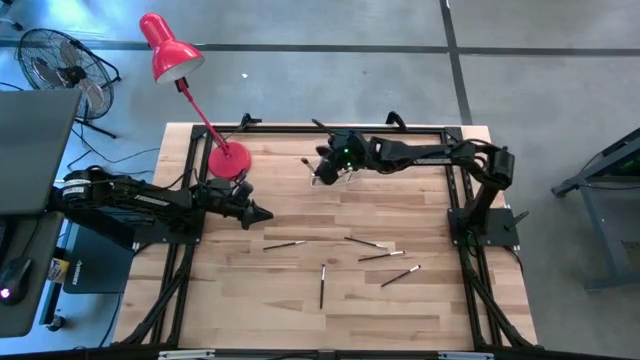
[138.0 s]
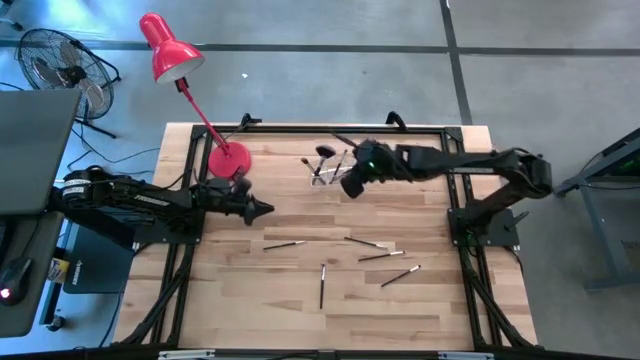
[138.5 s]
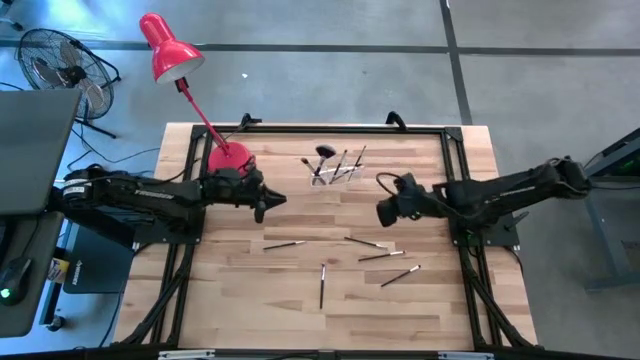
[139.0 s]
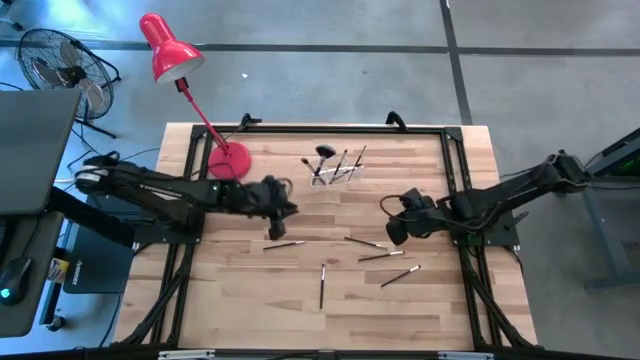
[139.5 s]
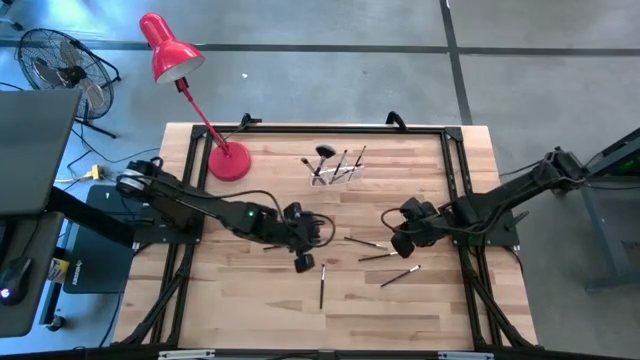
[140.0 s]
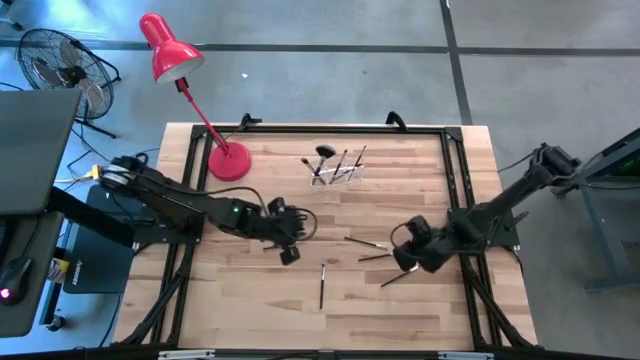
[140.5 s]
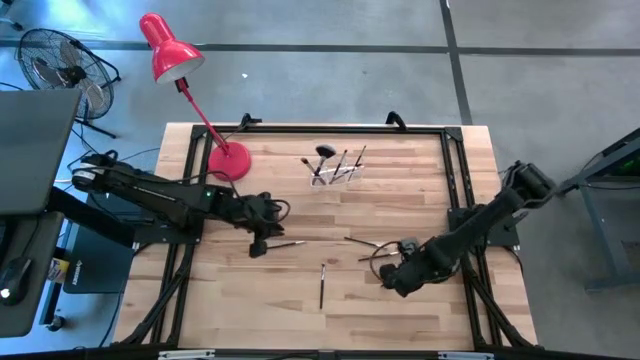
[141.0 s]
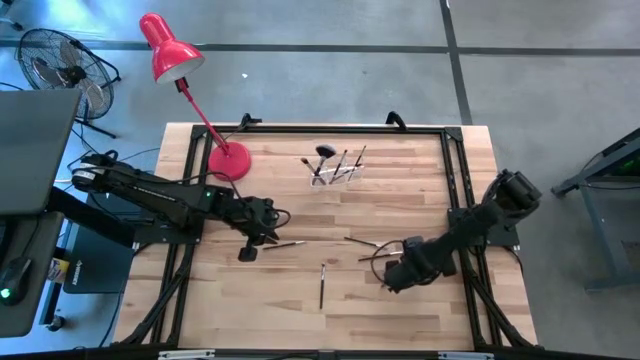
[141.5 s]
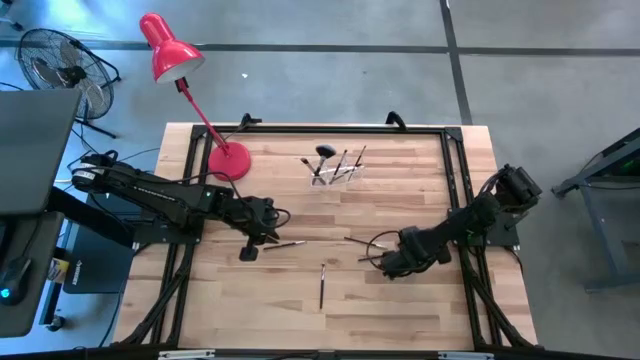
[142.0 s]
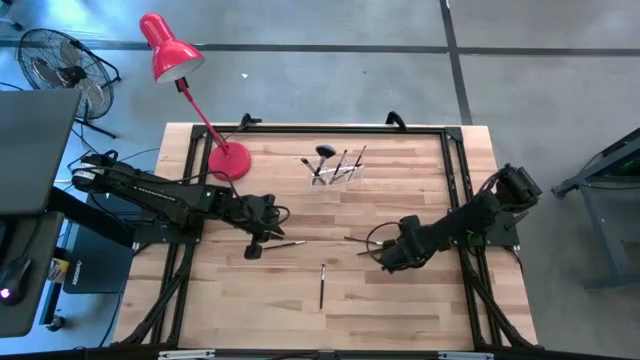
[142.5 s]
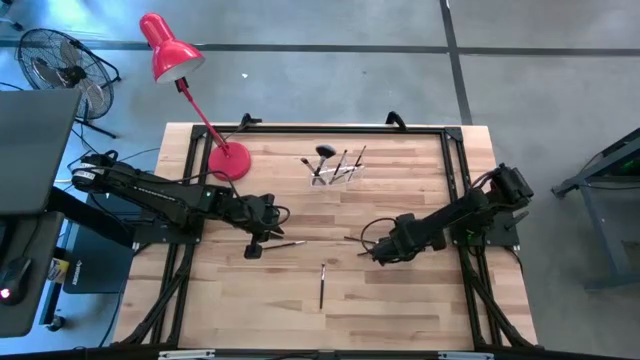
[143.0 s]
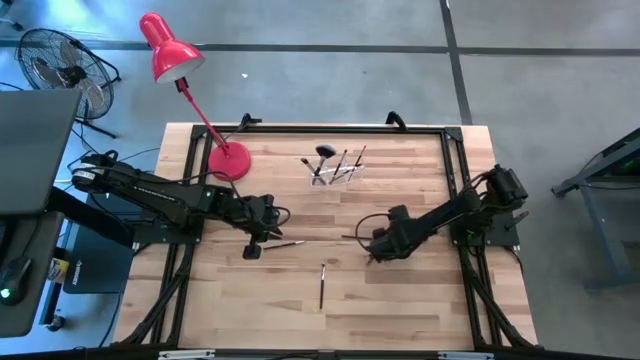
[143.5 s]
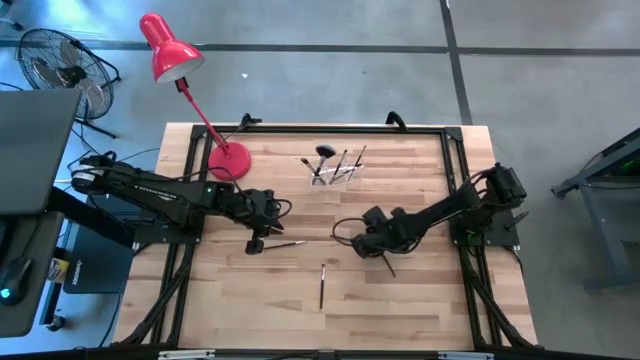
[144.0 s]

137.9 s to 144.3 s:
Task: Put items in baskets/containers
Adjust the eyeshadow brush on the table

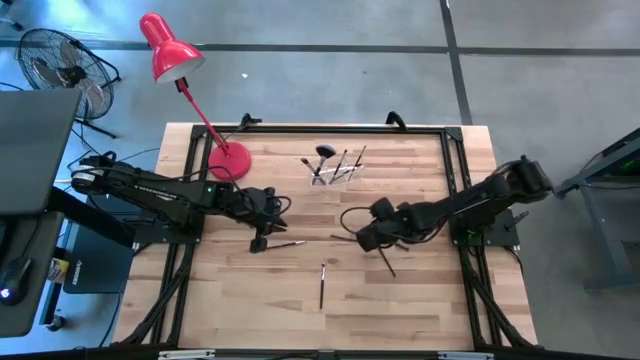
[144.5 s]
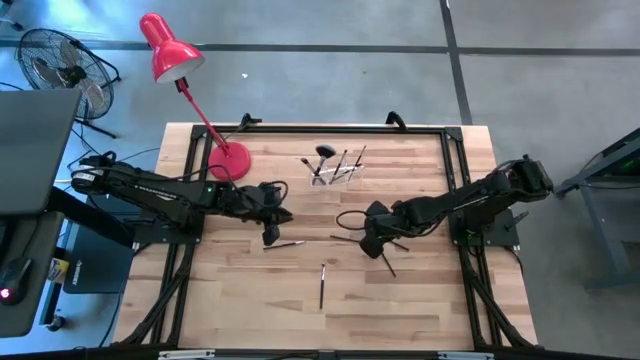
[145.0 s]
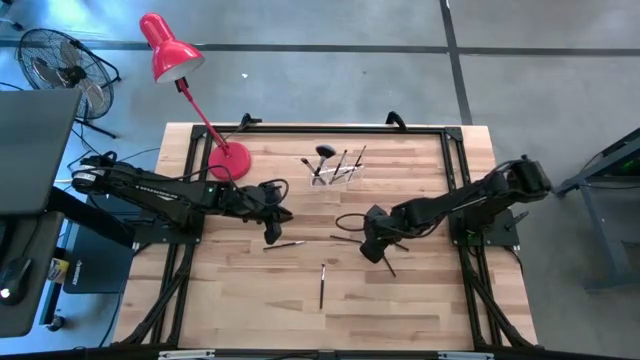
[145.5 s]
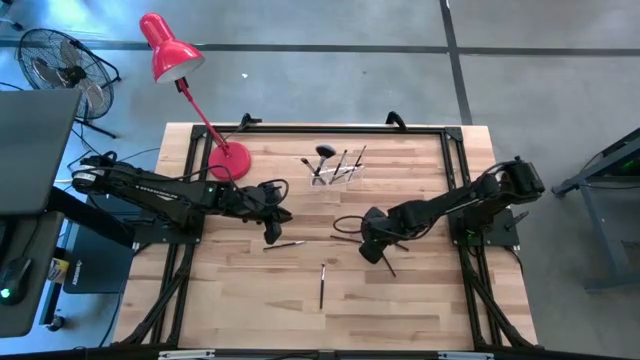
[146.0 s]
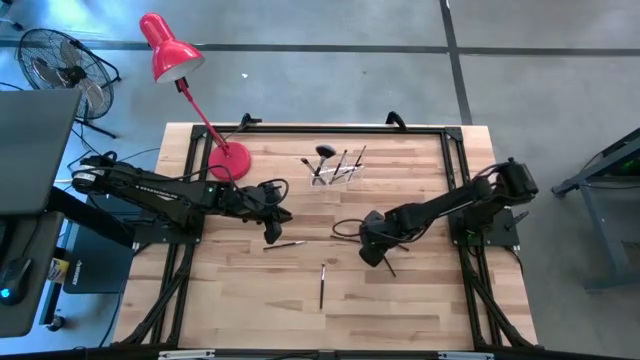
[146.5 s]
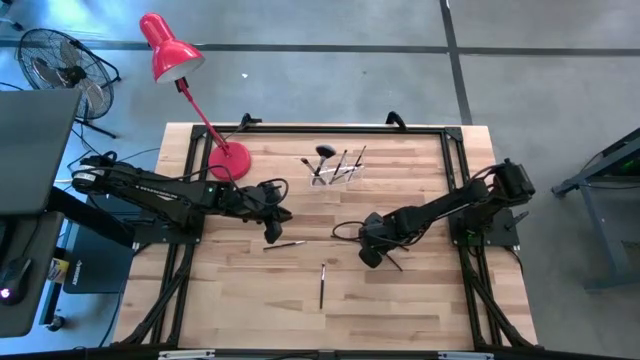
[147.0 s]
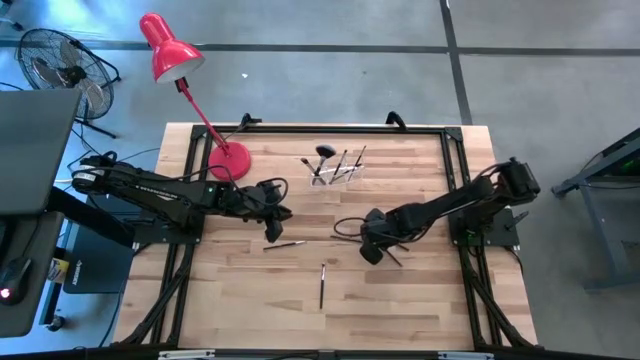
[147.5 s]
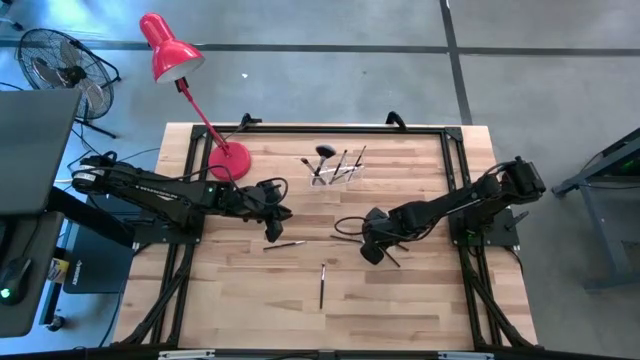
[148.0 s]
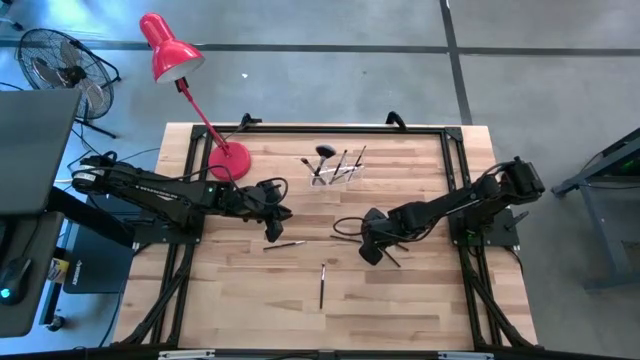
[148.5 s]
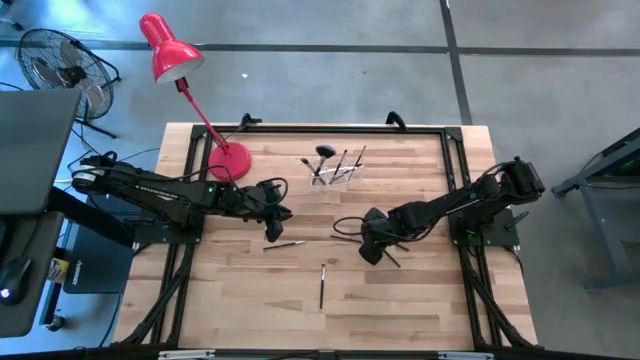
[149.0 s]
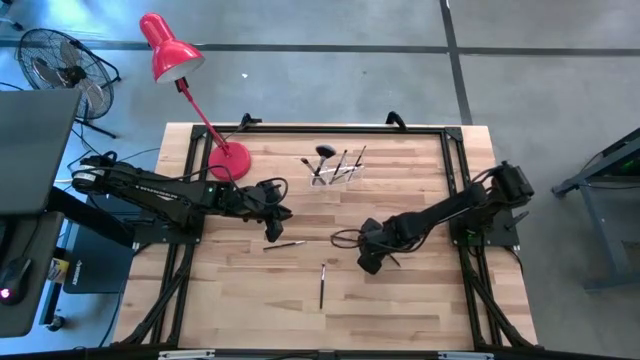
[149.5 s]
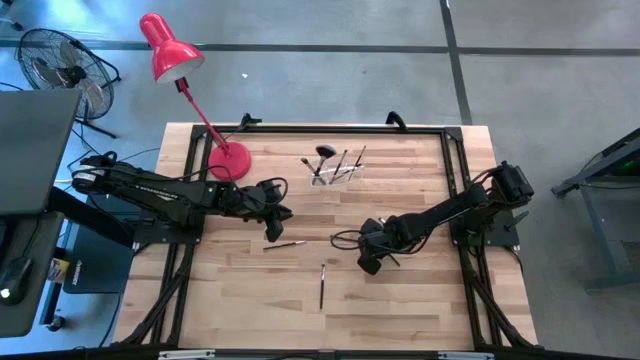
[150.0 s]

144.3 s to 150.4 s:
Put the eyeshadow brush into the transparent organizer

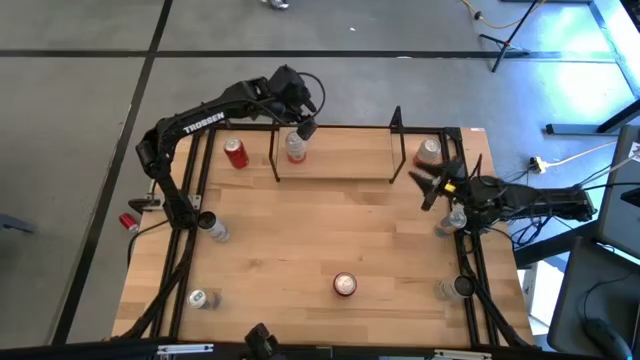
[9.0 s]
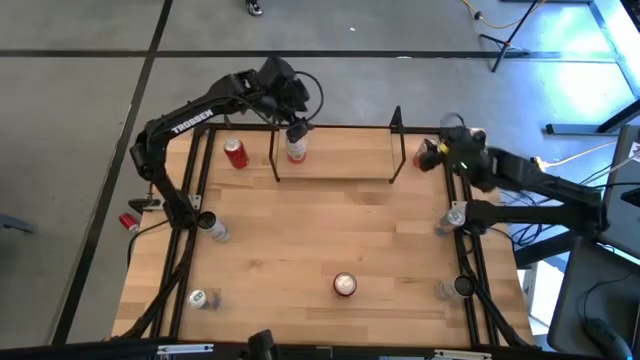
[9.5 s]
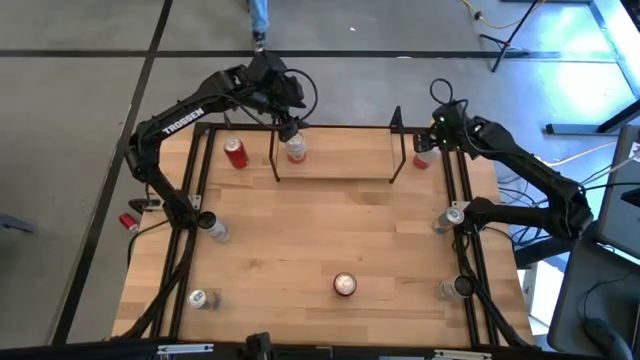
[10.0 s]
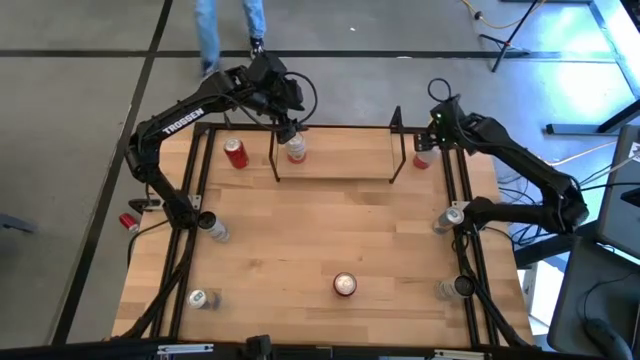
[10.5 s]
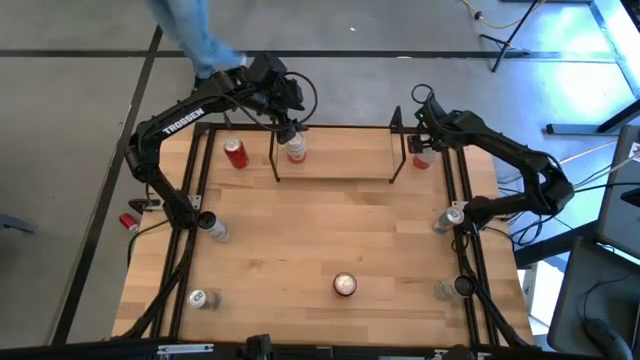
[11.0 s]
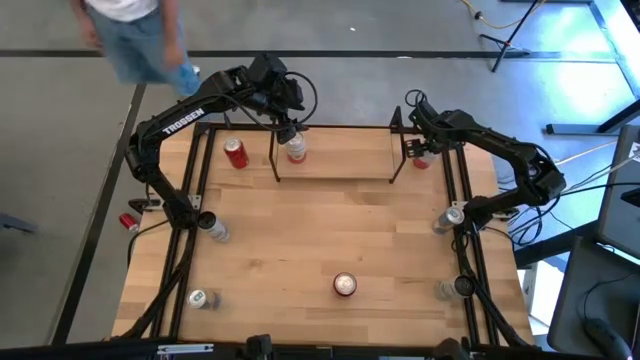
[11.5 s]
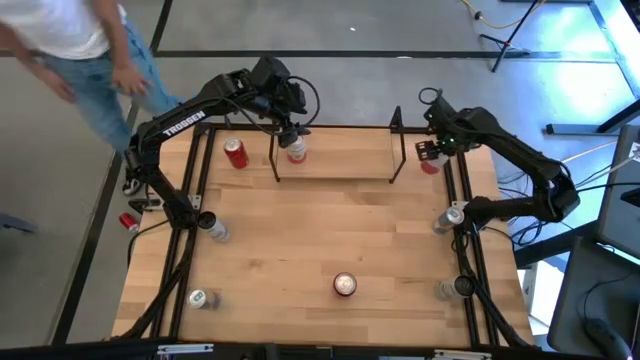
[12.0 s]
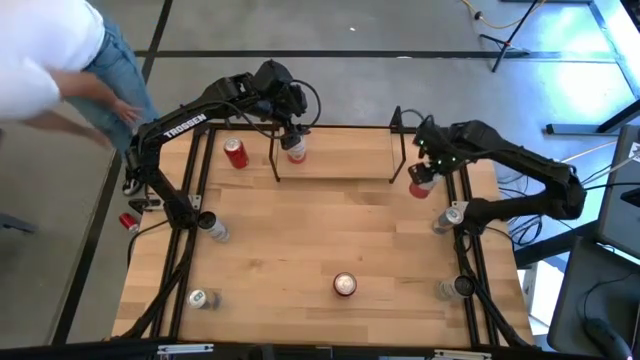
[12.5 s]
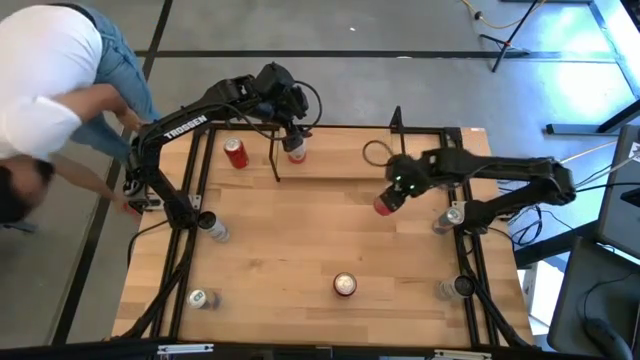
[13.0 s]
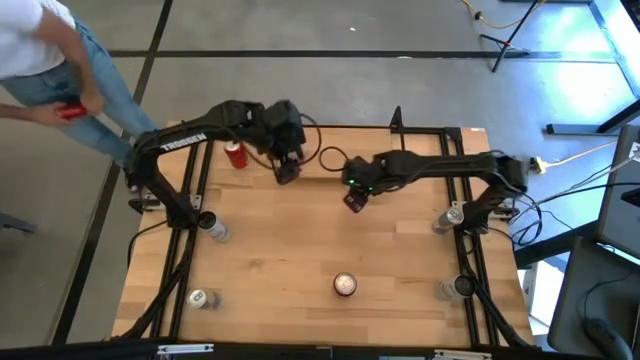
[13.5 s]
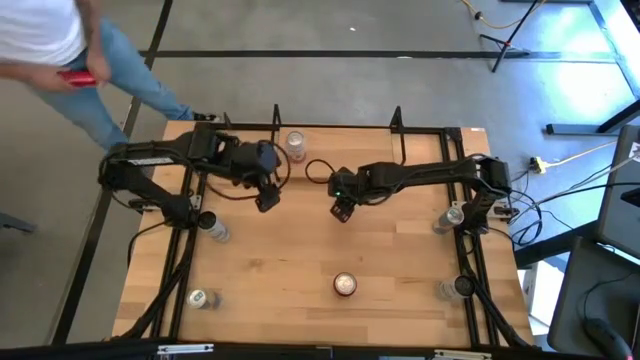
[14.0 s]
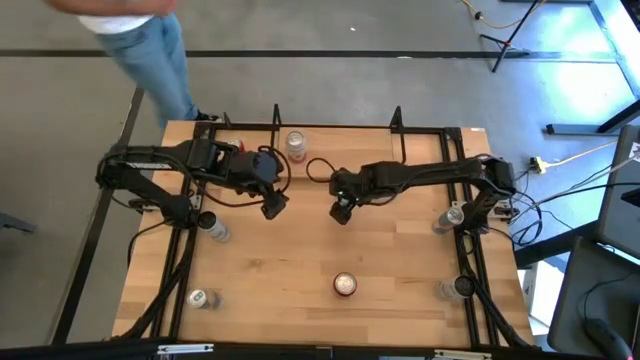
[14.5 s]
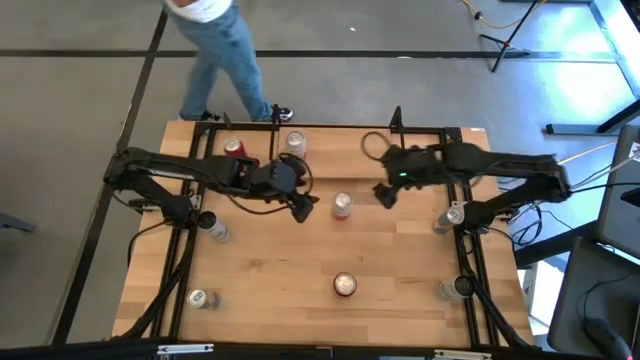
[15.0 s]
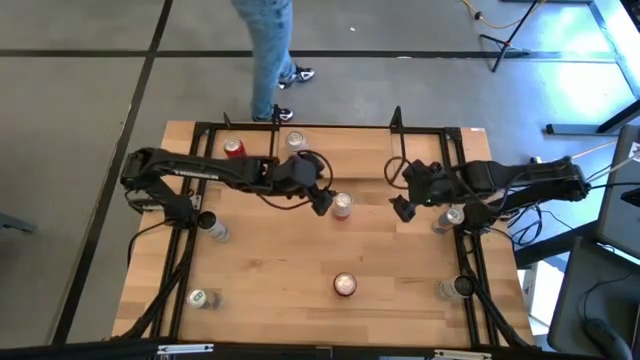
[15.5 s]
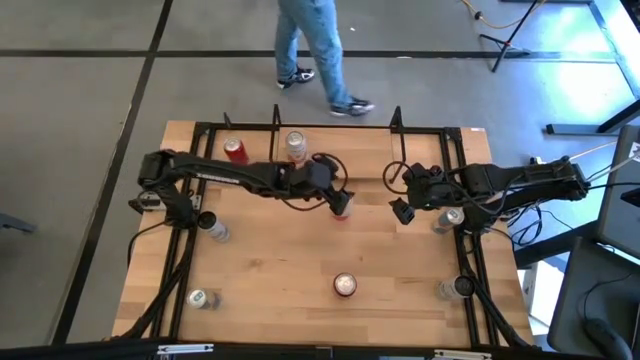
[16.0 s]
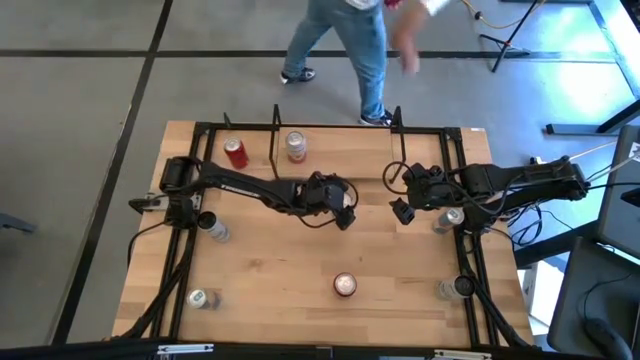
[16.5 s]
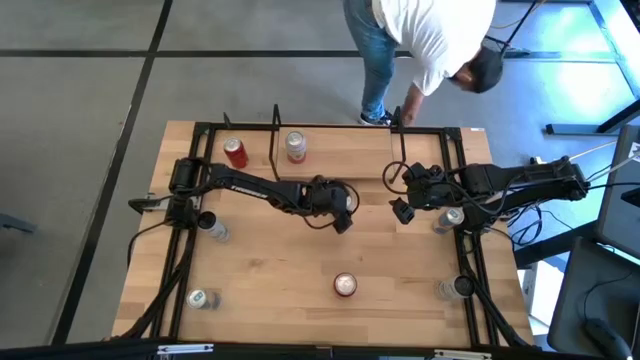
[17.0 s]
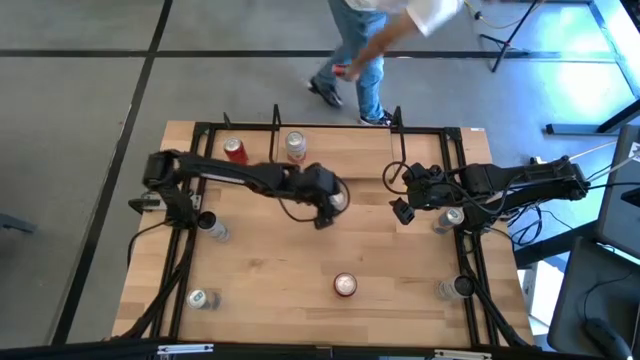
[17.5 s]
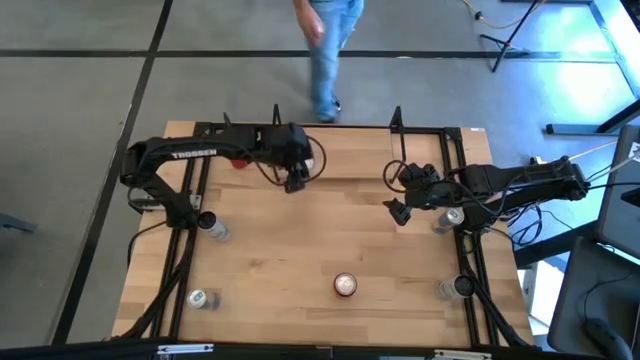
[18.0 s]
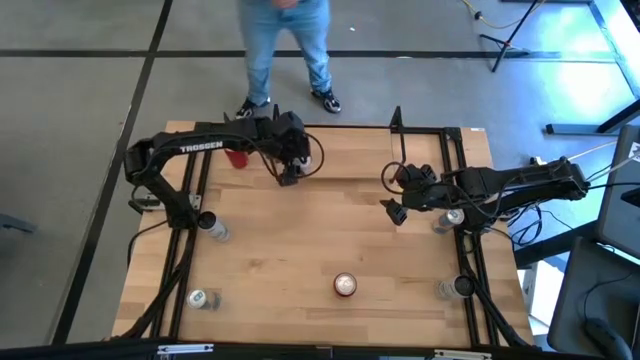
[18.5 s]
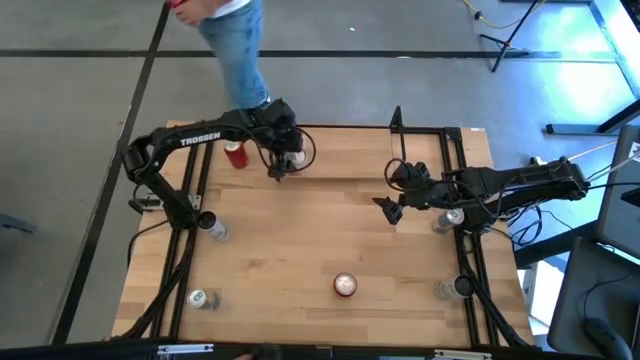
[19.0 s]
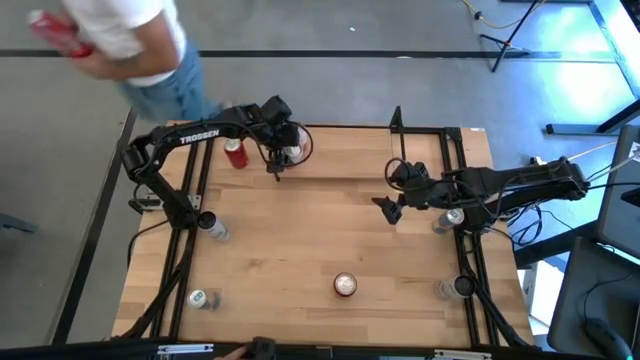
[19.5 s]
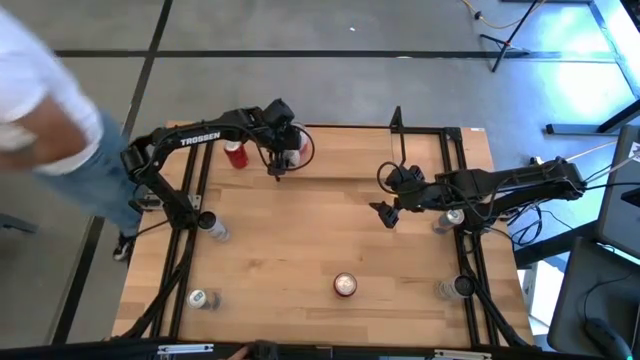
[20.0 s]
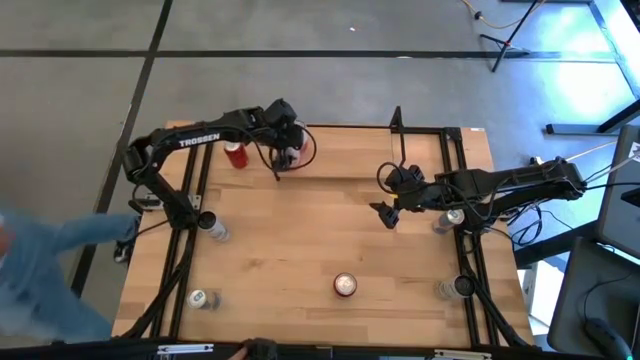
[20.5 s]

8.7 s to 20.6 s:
Task: Place canned beverage on shelf
Put the pink soda can on the shelf aligned with the other pink soda can
